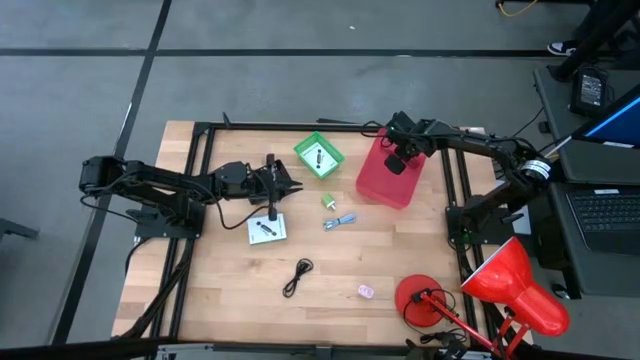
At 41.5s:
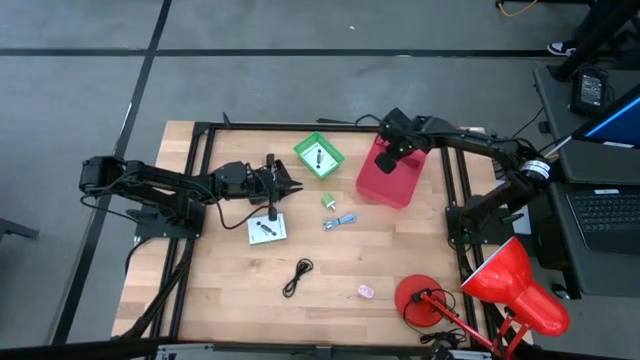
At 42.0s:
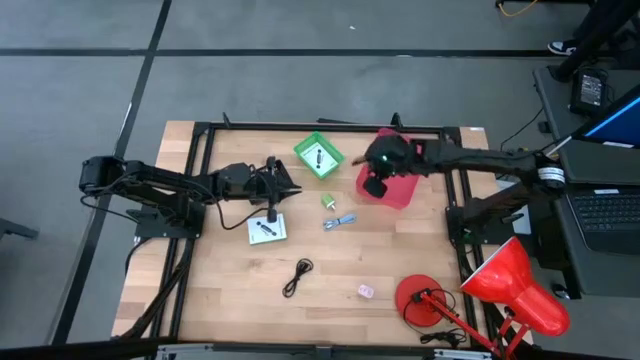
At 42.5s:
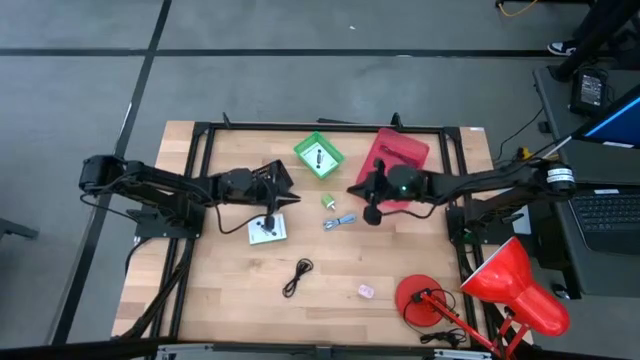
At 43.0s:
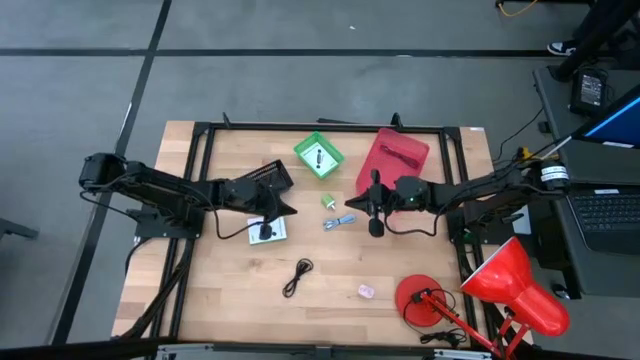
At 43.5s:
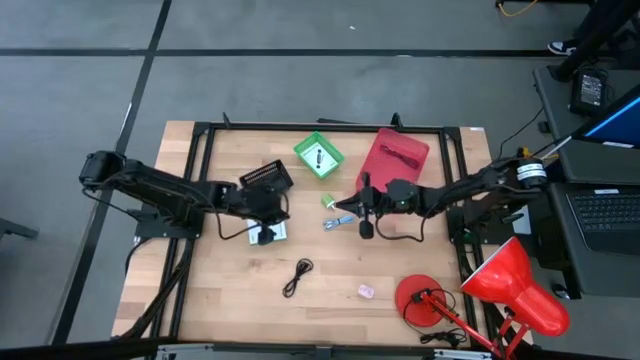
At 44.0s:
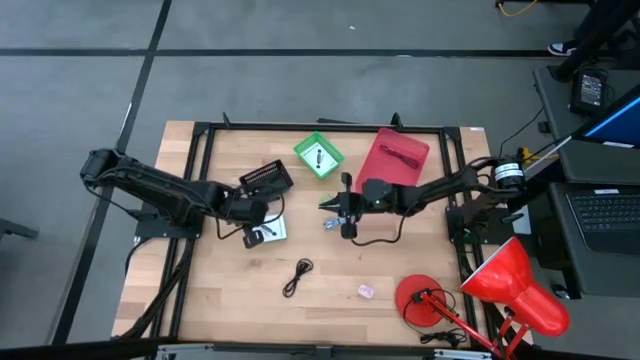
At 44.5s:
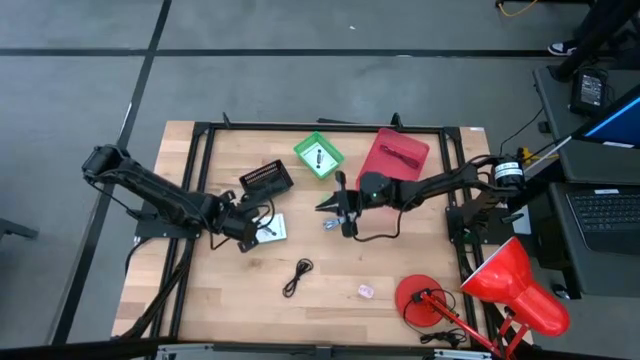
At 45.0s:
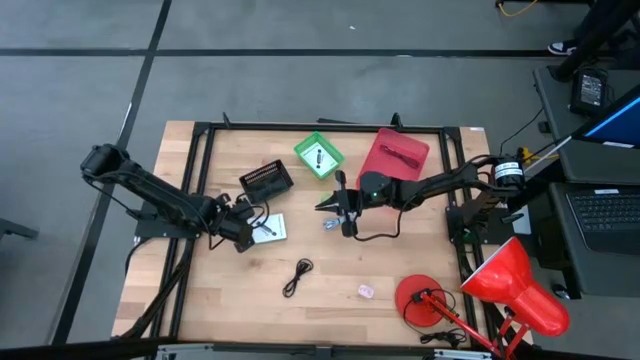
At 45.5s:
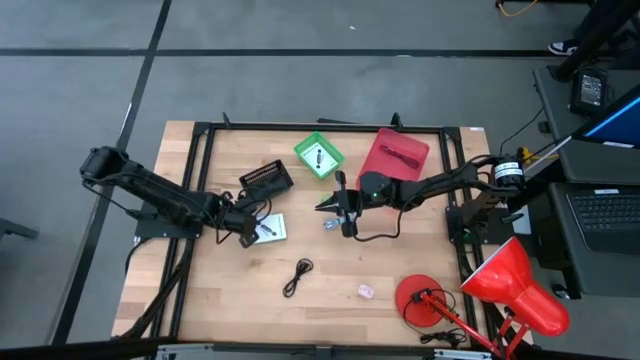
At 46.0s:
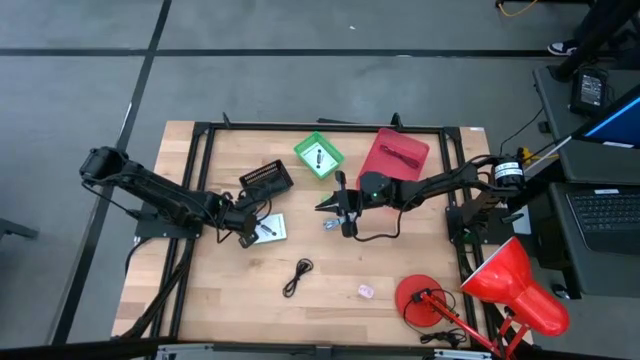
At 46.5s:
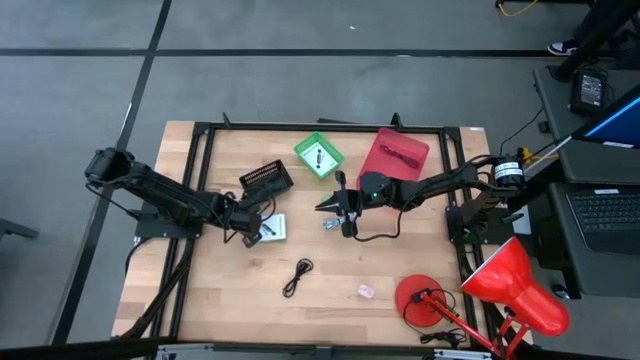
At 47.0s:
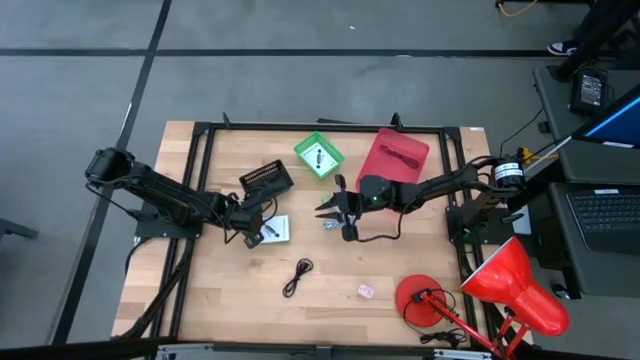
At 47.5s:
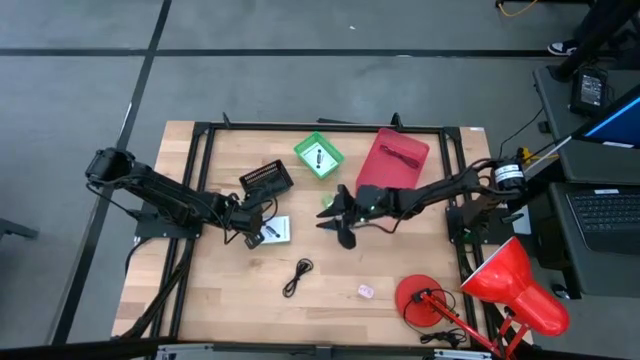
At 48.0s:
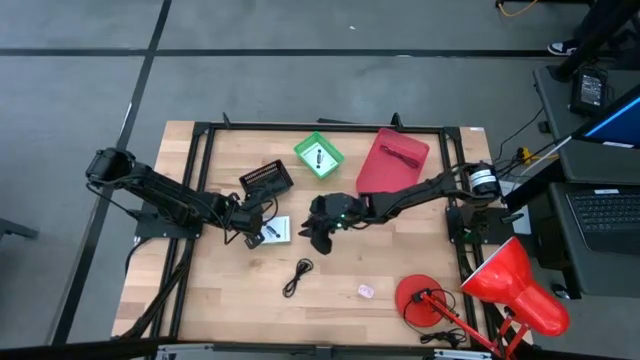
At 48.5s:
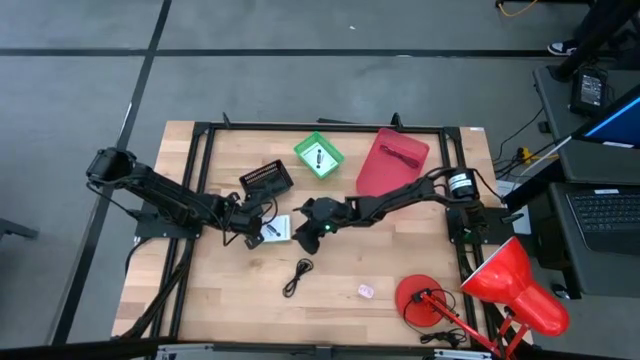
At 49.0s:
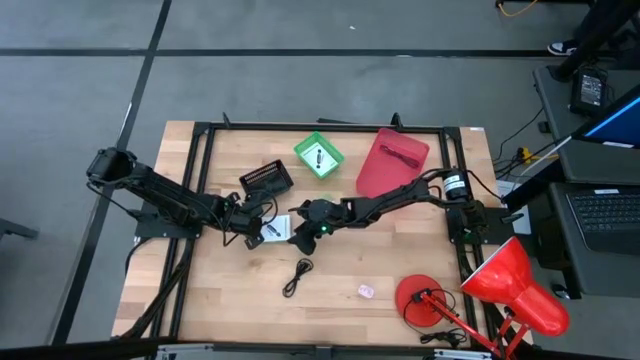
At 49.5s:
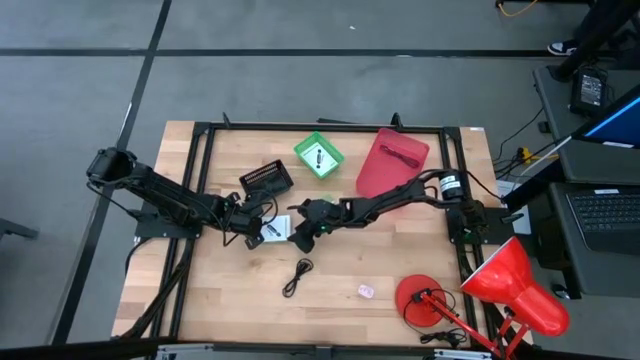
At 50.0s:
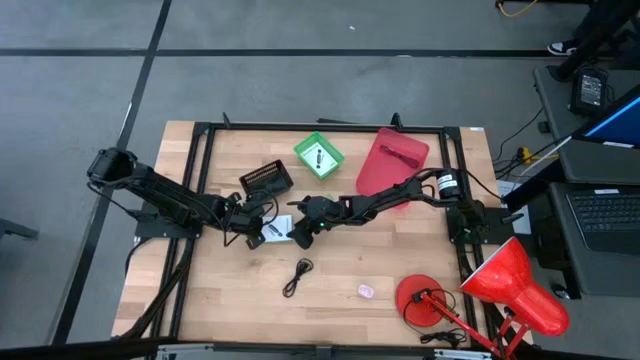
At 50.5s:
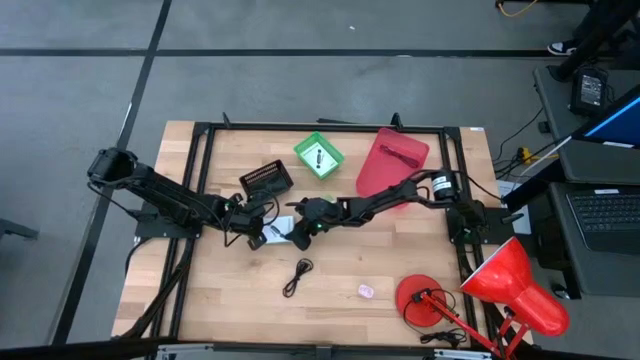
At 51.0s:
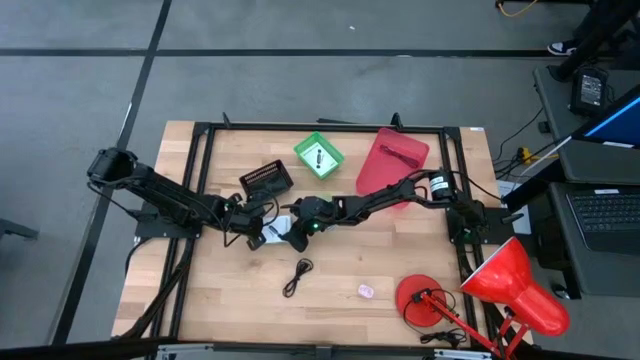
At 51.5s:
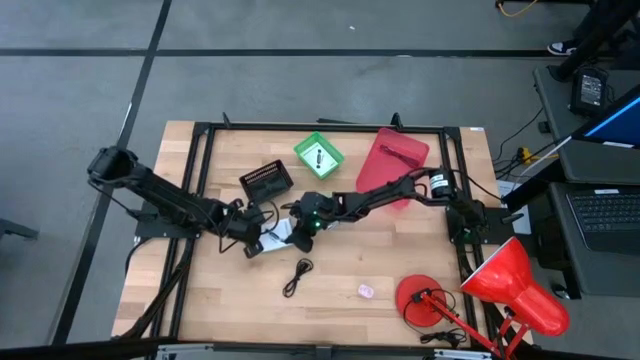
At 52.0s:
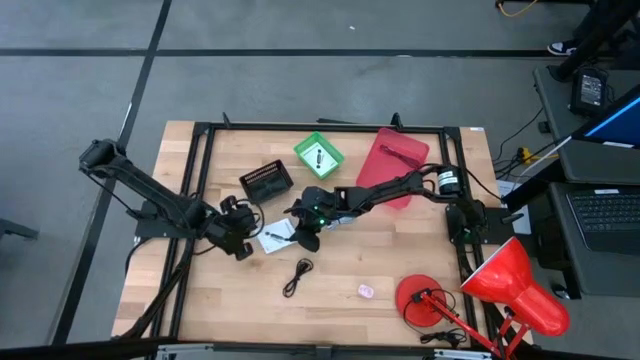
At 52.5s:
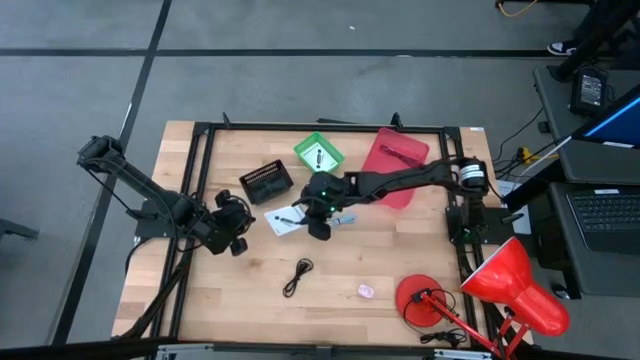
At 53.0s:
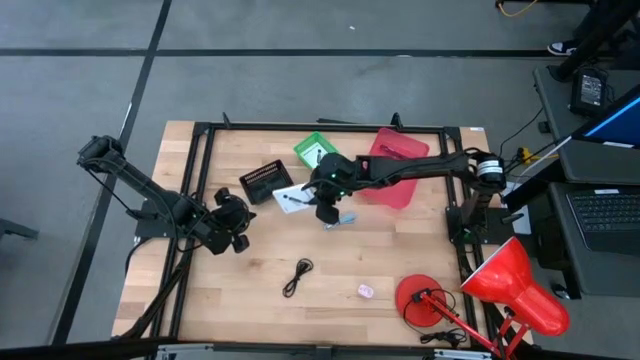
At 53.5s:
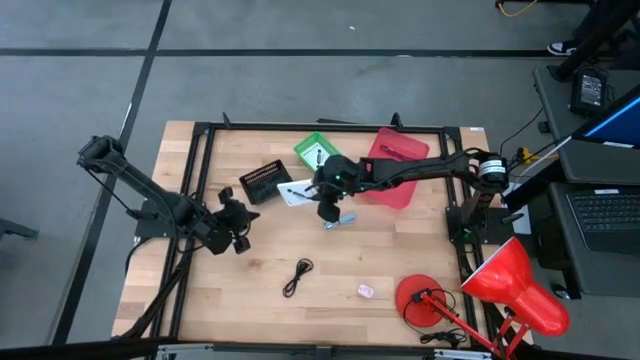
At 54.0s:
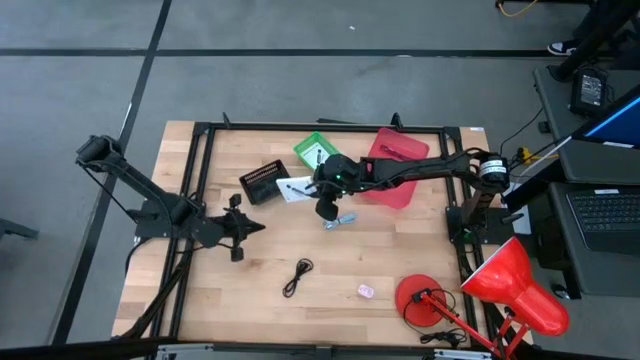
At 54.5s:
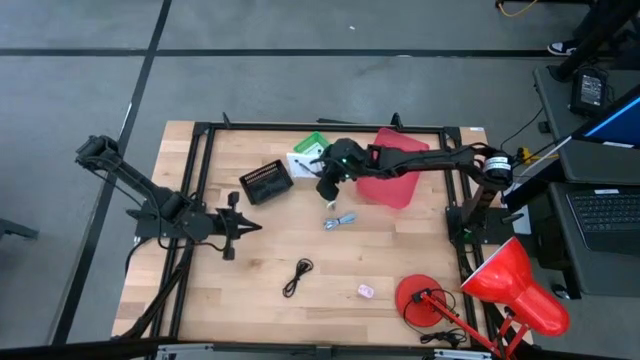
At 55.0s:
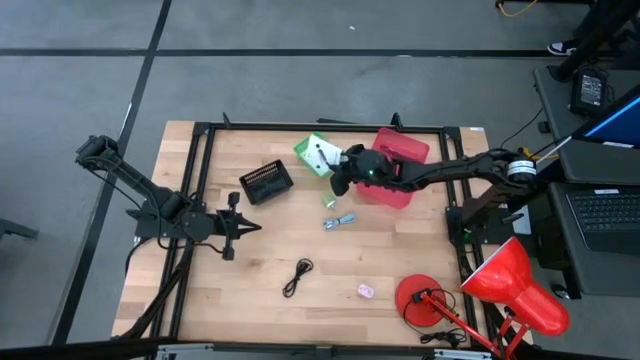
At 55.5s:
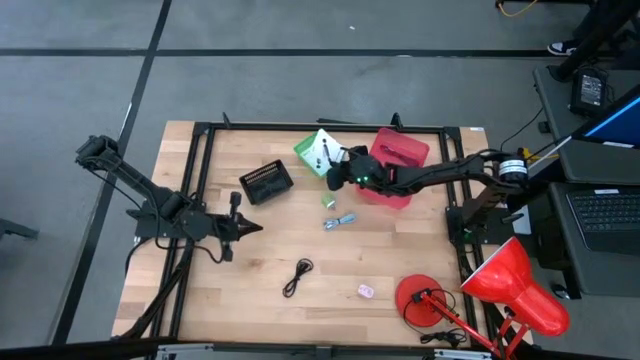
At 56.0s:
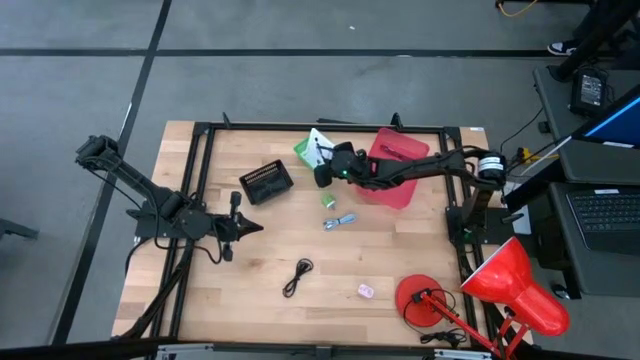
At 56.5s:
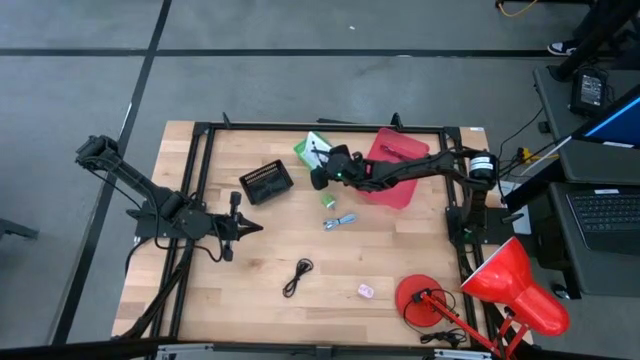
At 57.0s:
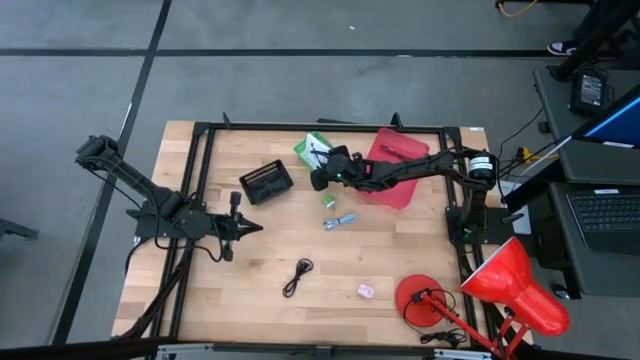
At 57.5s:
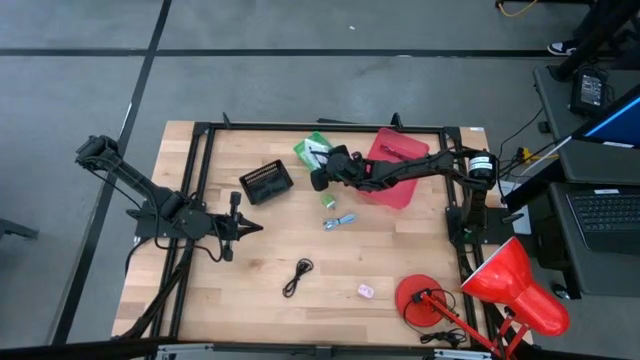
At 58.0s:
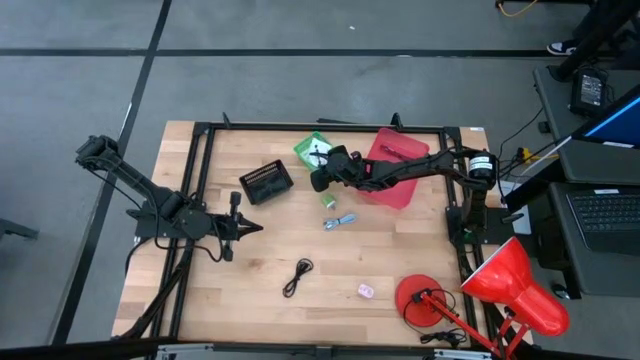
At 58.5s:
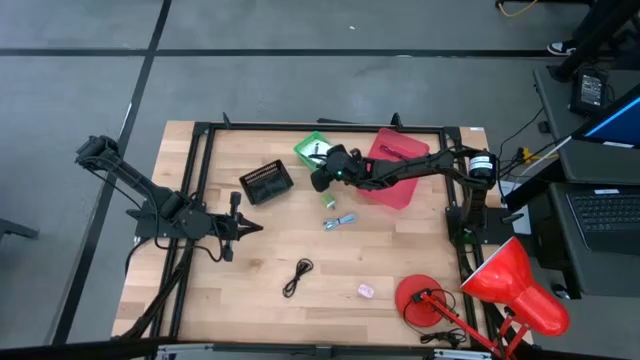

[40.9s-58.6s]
Task: Pick and place items into bin
Put the white card reader box into the green bin

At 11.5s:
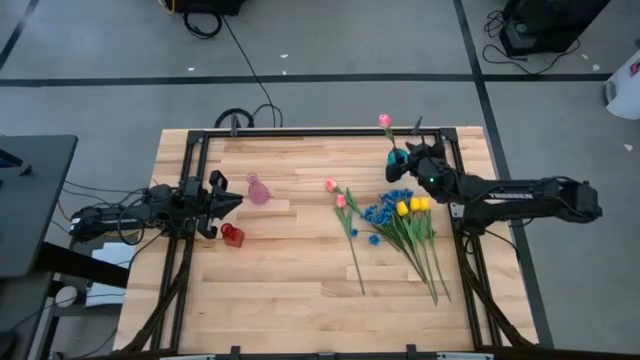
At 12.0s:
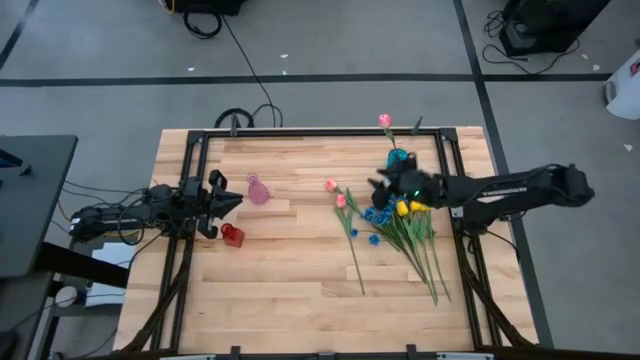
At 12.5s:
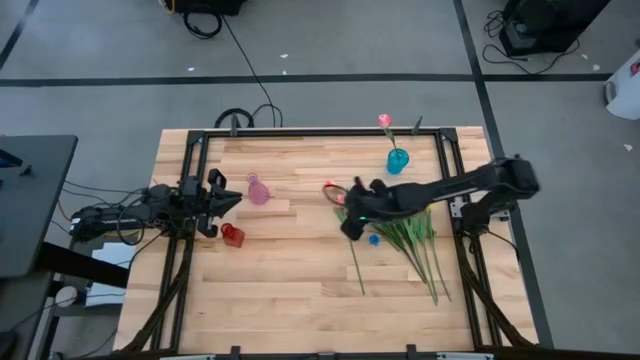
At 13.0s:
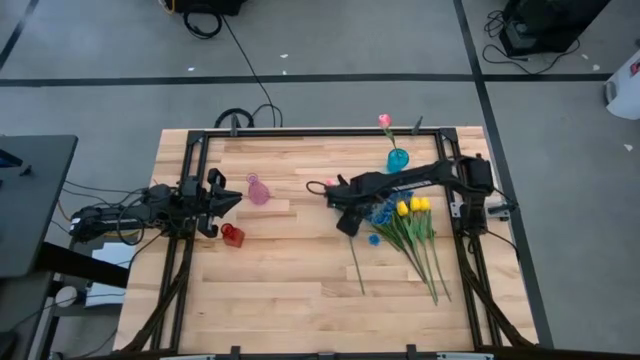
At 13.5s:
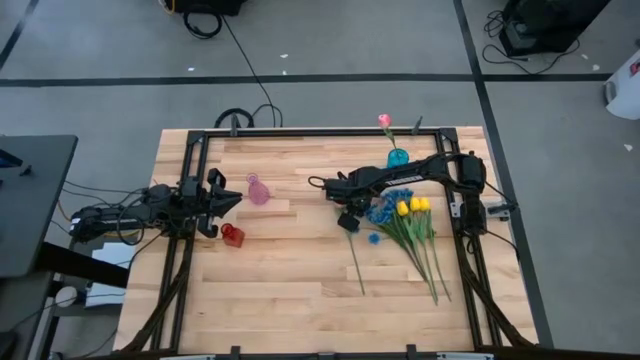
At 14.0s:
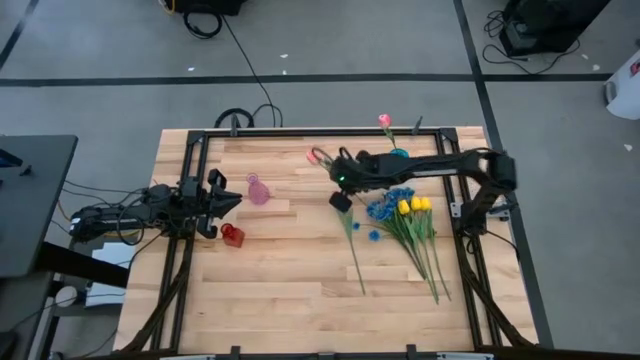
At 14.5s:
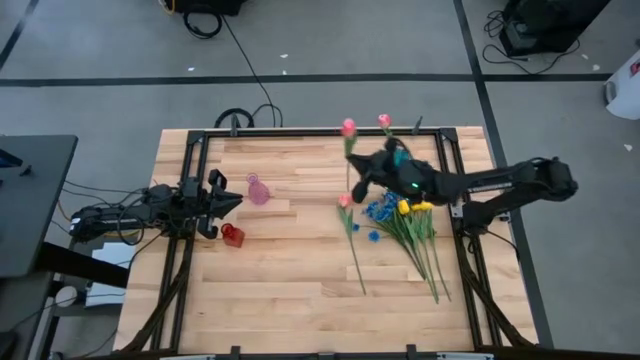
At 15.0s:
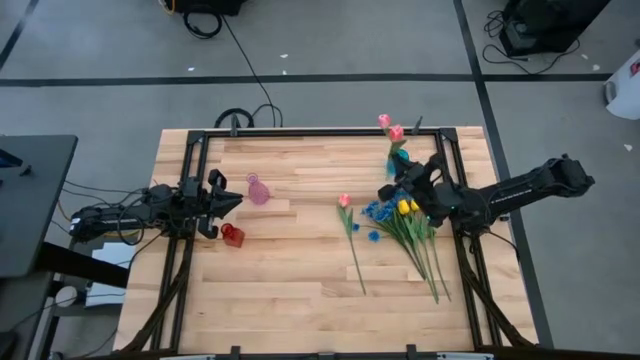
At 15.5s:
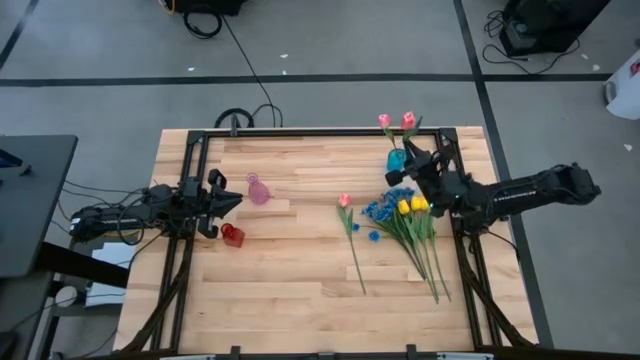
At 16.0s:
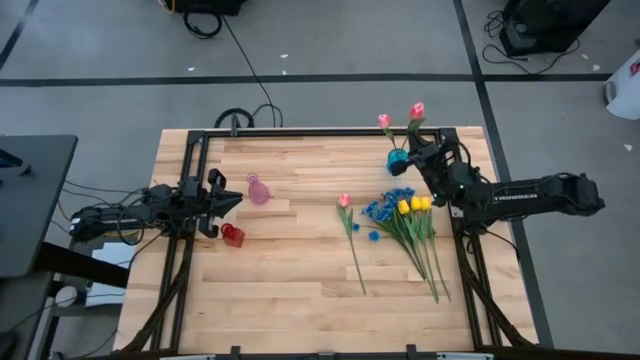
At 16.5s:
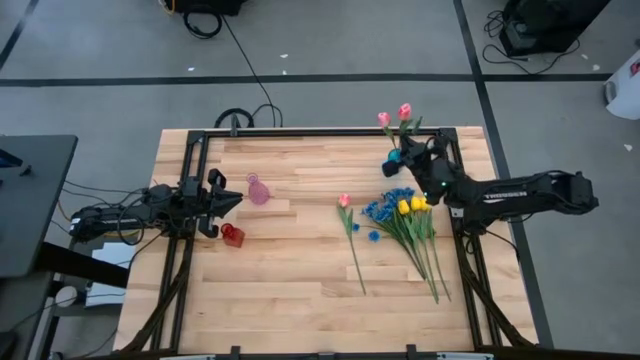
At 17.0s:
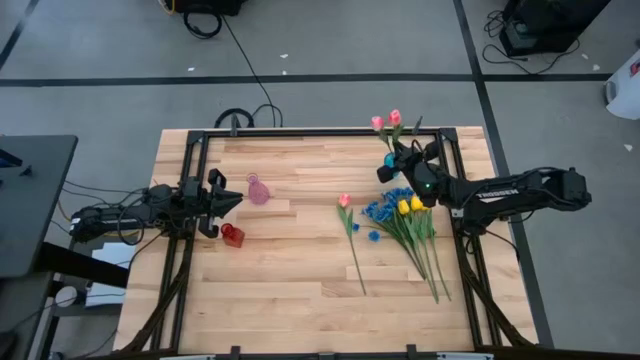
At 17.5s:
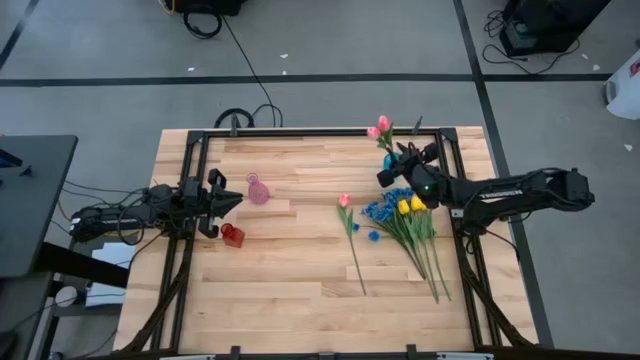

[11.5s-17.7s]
Task: Sort flowers into vase by color
Put the top pink flower into the blue vase
